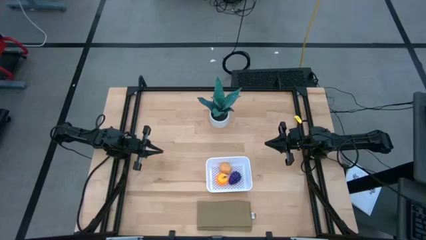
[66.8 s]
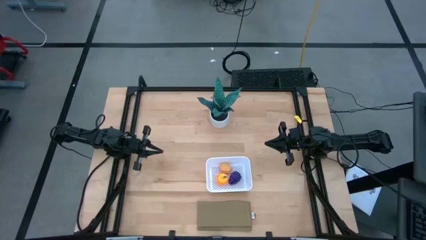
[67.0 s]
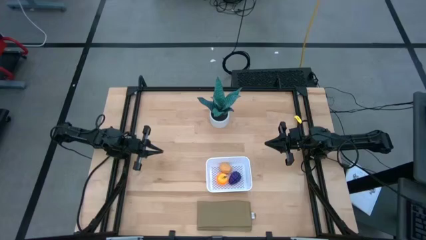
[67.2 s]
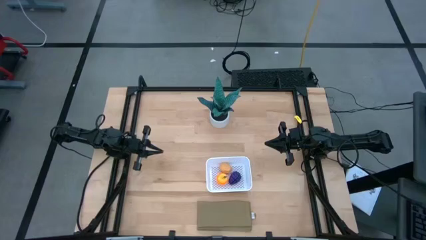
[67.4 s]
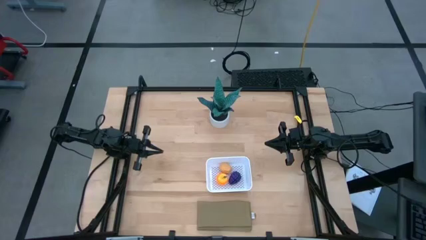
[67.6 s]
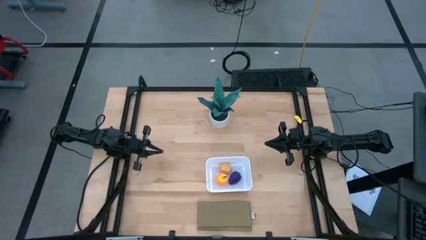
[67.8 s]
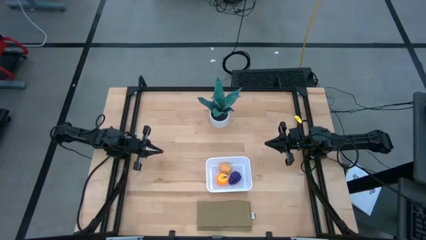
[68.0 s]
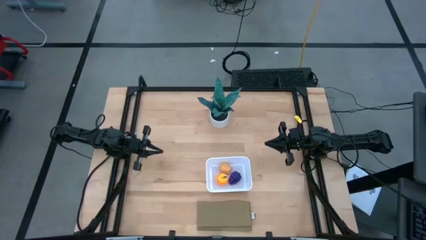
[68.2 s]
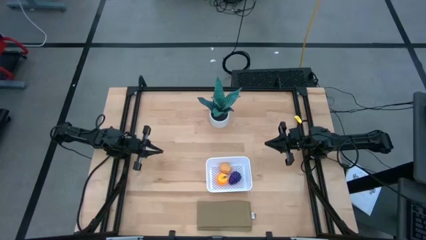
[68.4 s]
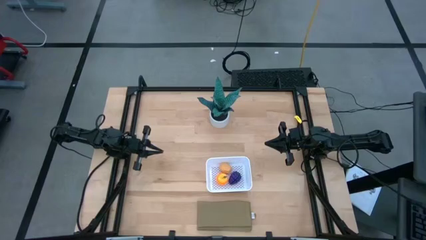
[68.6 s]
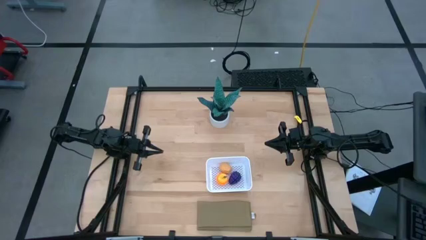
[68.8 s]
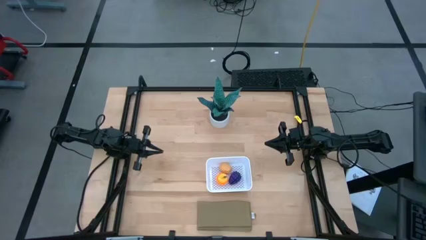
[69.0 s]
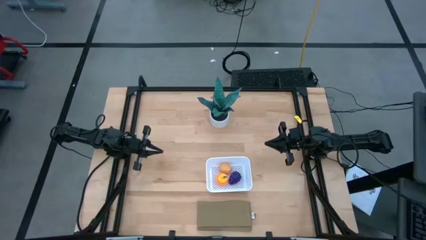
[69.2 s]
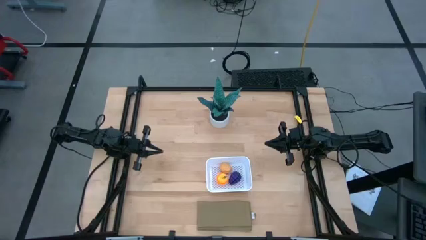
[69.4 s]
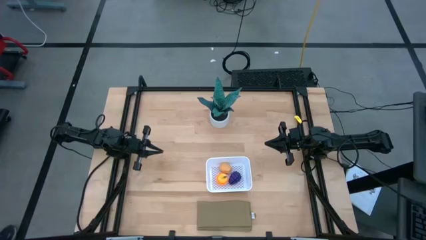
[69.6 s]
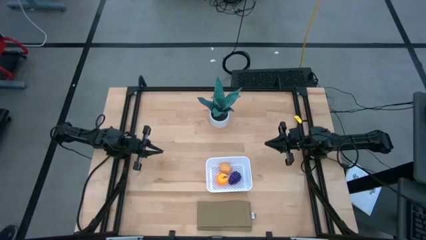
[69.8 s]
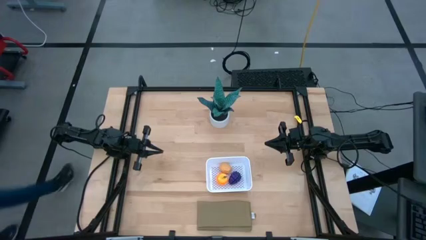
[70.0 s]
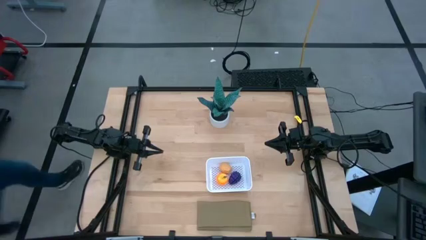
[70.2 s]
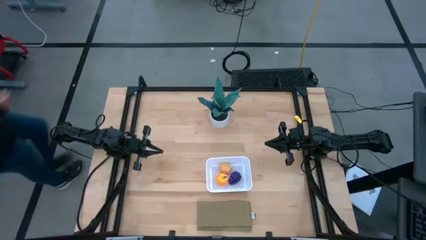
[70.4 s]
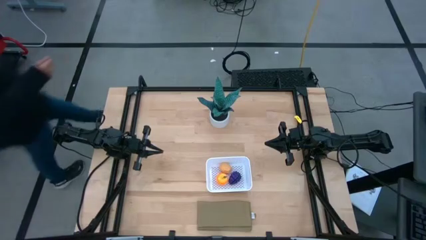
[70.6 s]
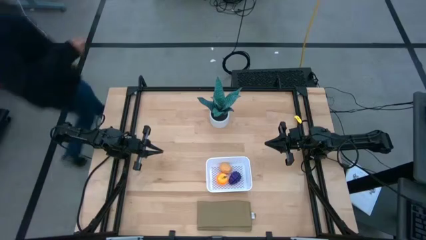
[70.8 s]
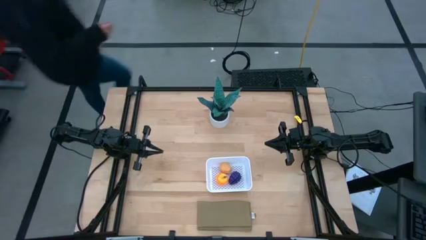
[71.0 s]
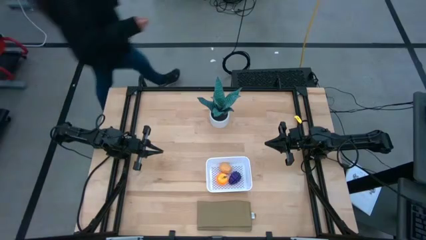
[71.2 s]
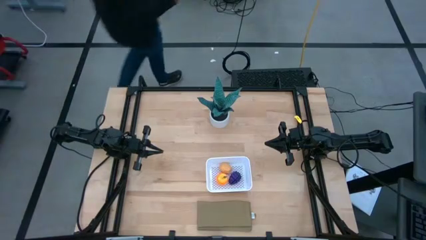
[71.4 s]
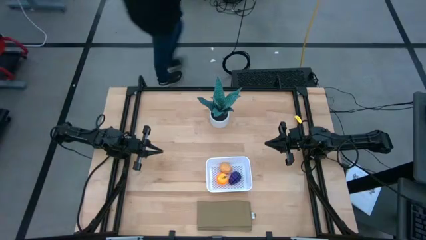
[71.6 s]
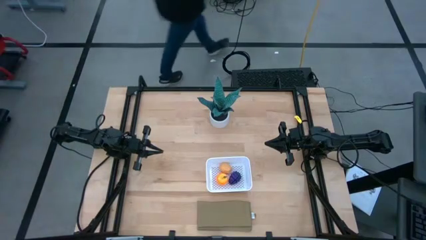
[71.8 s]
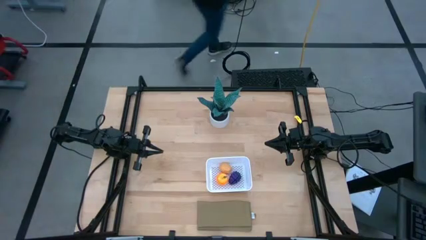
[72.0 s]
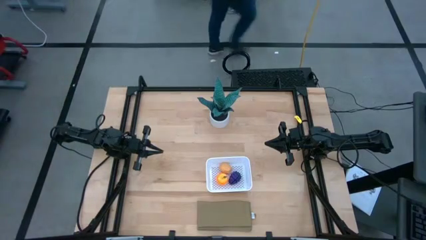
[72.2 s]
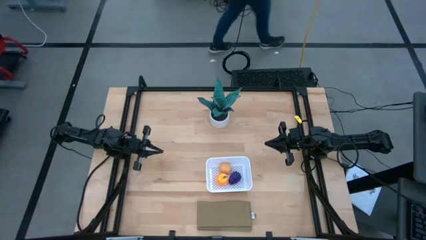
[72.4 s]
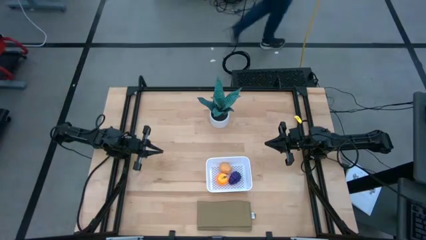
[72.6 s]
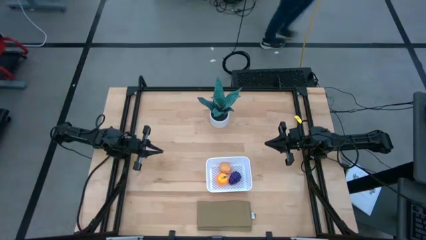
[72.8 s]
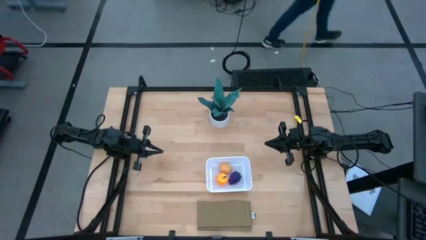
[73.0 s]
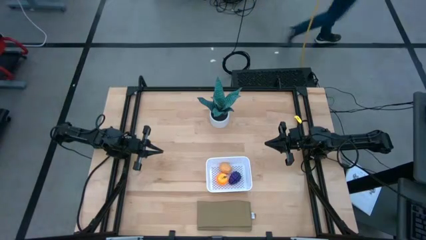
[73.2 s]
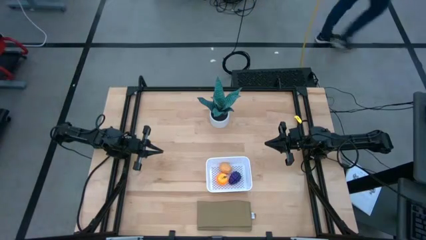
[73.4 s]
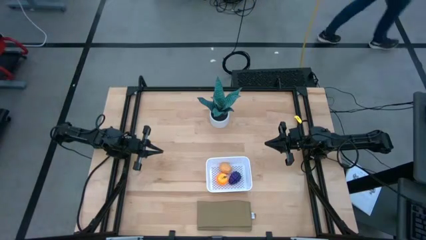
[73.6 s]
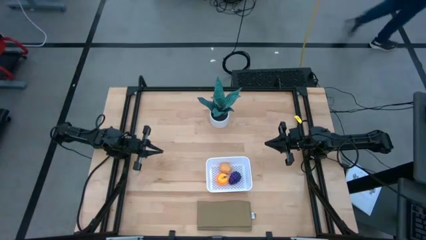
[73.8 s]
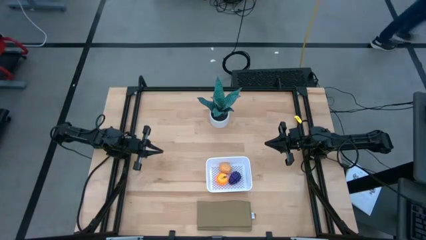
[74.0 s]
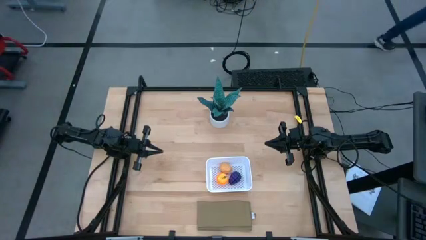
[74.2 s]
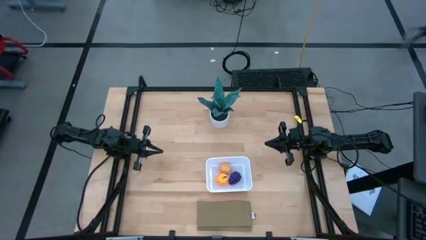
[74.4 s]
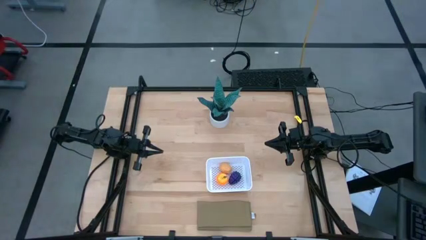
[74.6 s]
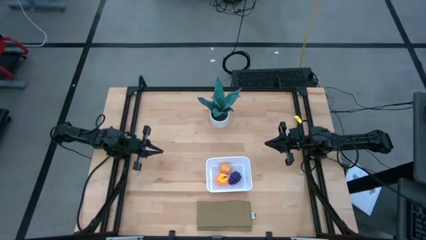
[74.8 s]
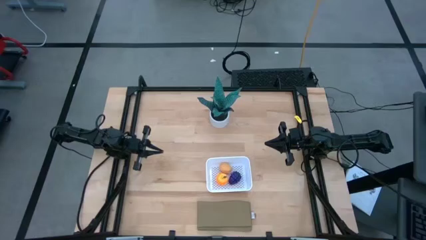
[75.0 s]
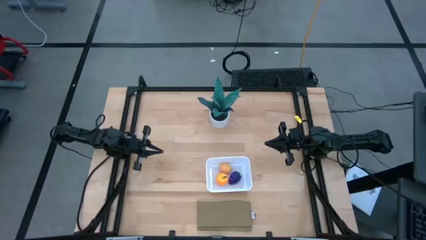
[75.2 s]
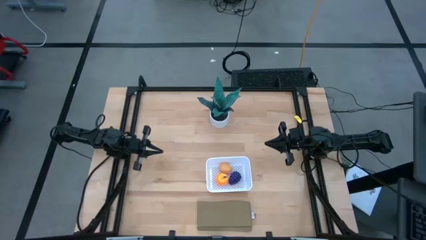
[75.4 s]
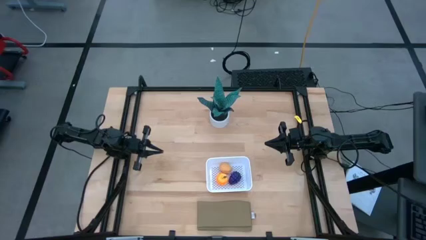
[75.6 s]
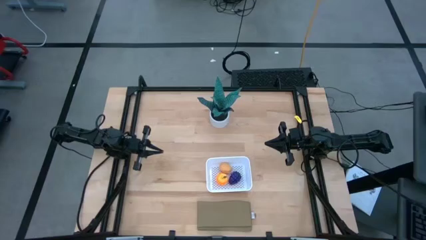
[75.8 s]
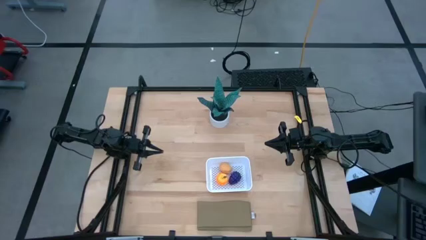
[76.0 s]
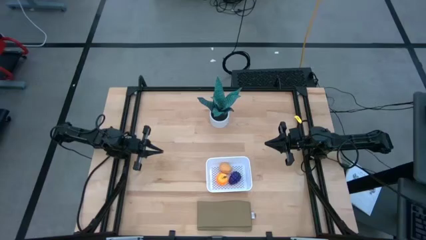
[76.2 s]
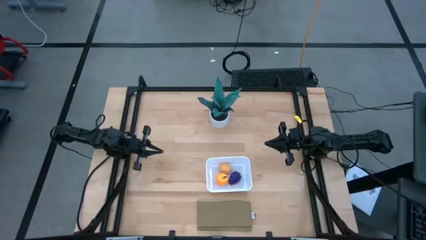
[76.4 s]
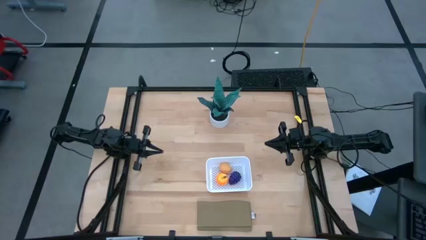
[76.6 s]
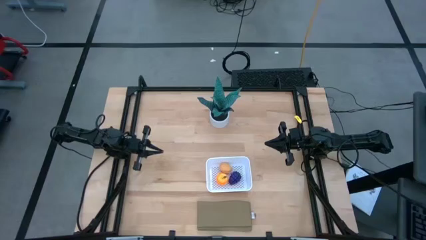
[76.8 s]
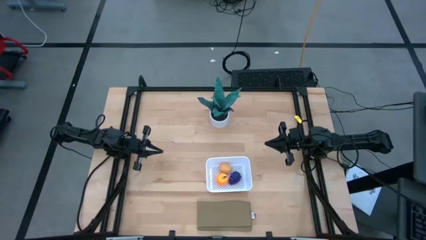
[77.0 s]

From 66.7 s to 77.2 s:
Task: Pick and placing Produce into tupperware
Return to Home Position
